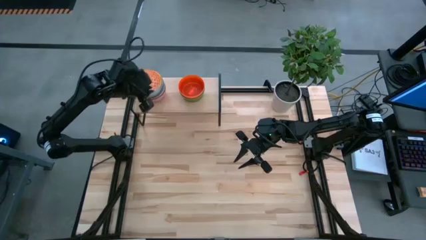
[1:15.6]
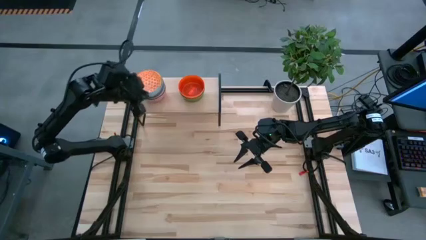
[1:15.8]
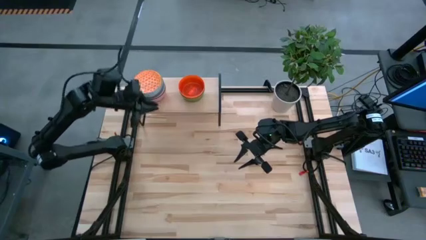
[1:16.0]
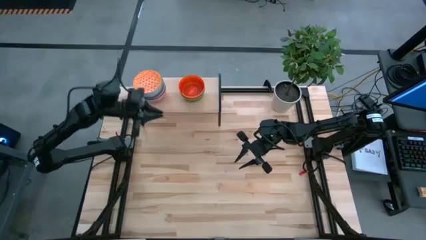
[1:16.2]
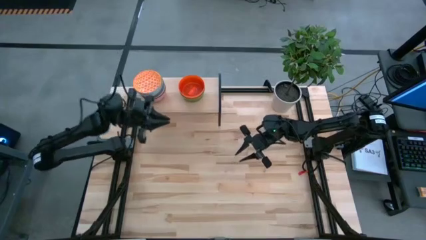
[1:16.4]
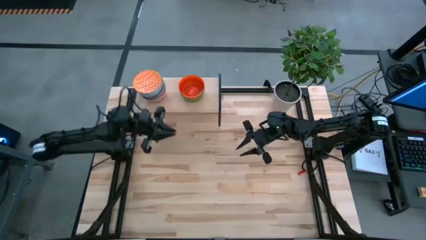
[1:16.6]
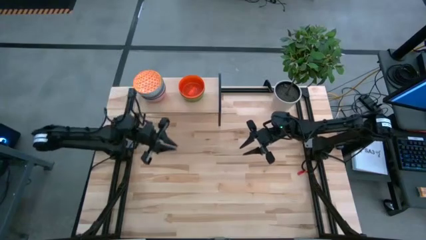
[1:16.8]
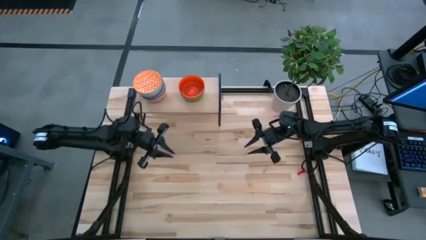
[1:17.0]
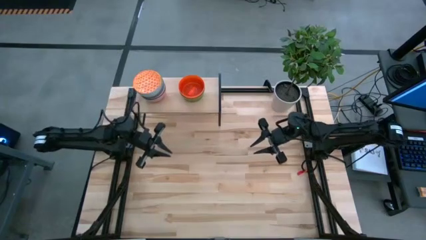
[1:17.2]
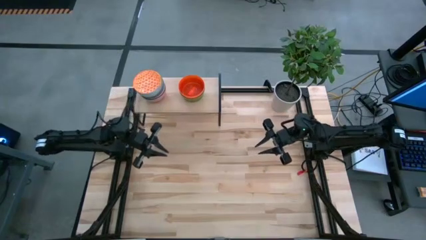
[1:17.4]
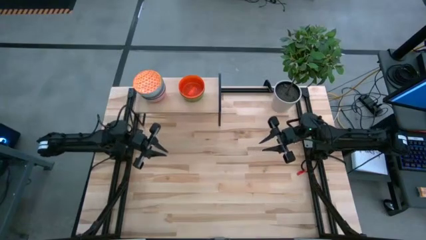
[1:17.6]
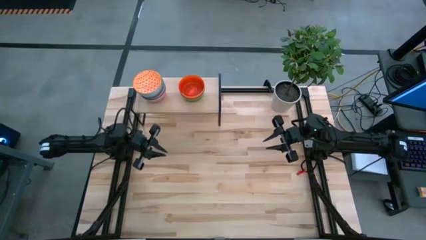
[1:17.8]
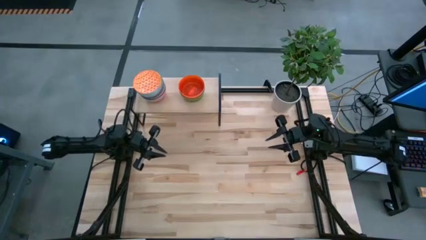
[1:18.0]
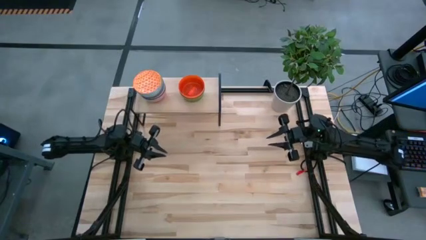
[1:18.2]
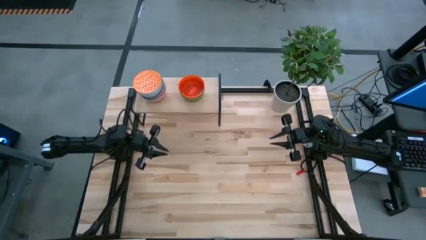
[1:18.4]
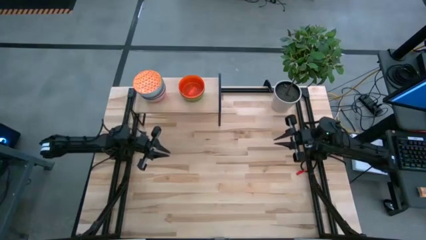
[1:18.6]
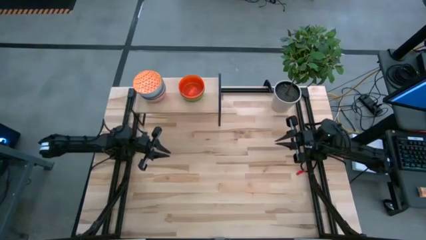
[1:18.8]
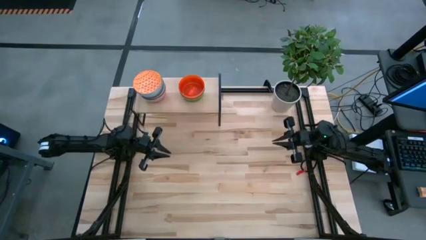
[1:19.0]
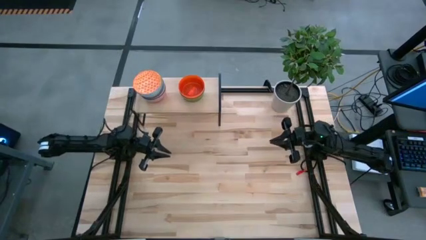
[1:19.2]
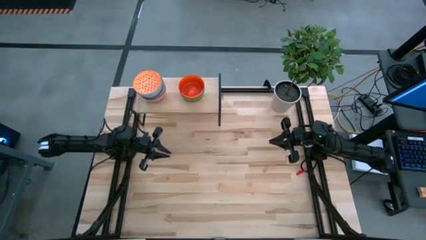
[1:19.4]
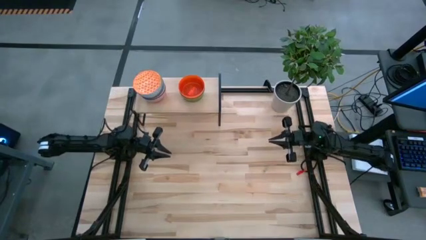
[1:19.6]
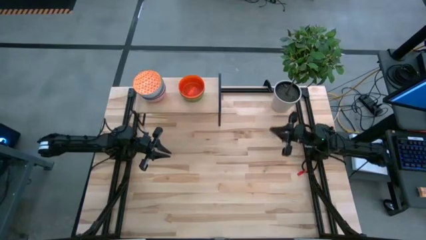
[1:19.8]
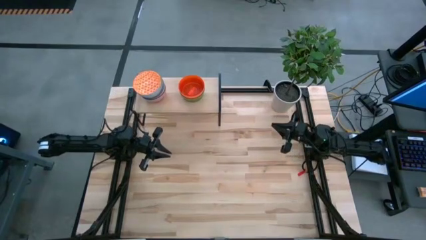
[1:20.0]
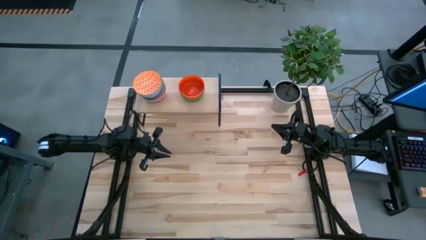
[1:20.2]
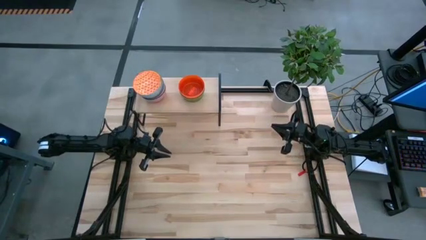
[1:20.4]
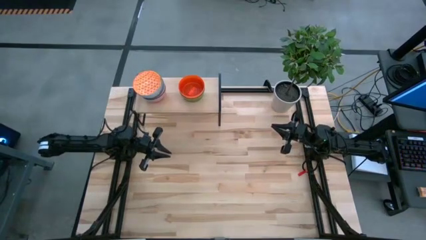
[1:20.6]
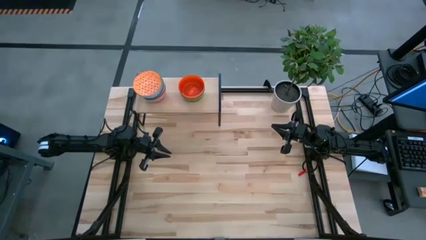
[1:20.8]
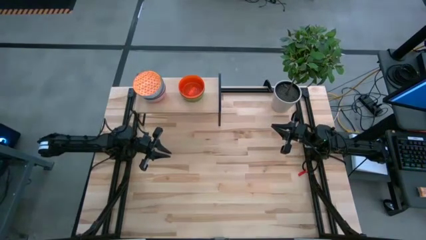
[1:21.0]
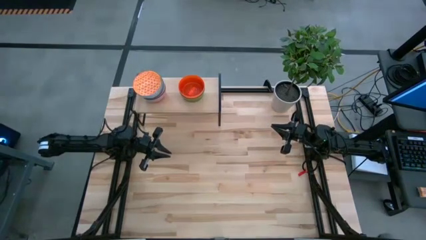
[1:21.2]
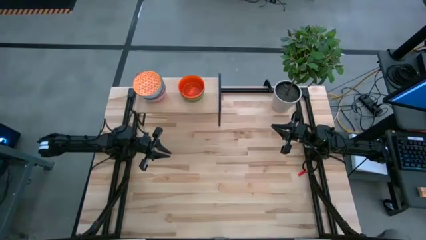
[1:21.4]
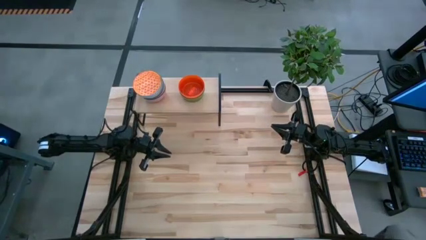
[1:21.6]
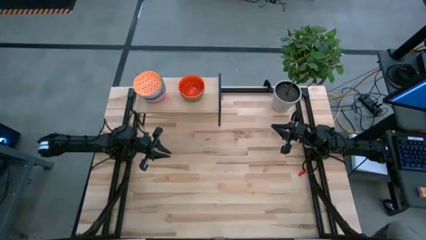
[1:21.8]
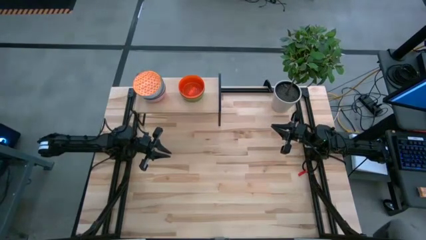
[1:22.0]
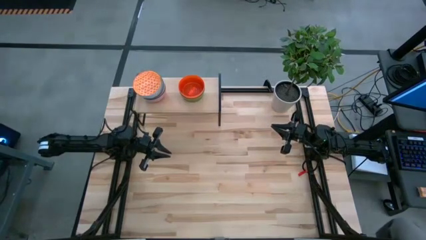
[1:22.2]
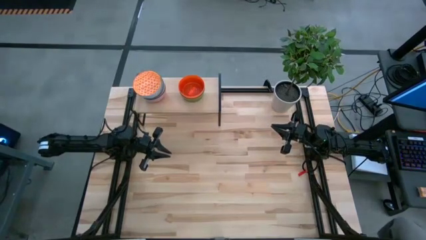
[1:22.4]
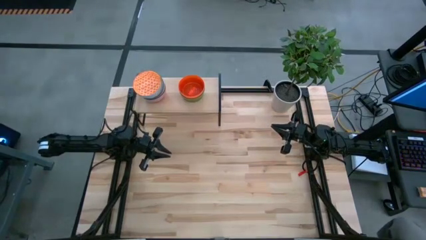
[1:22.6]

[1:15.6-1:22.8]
Task: Place and stack bowls onto a shelf
Return to Home Position

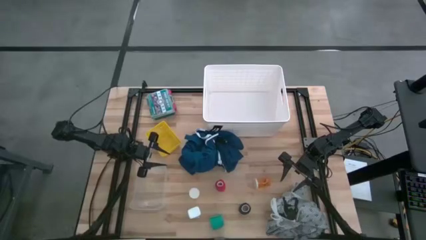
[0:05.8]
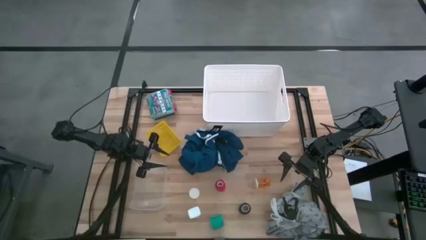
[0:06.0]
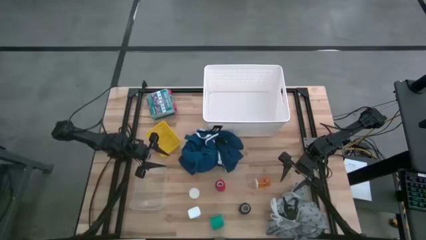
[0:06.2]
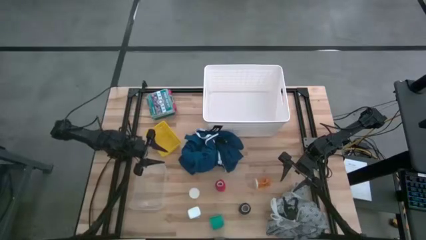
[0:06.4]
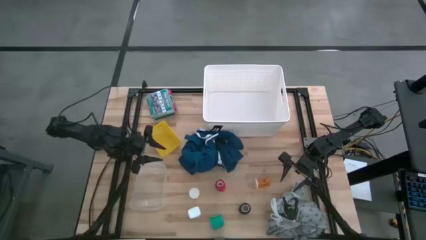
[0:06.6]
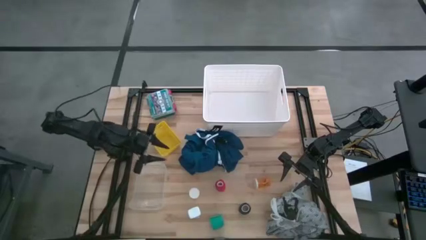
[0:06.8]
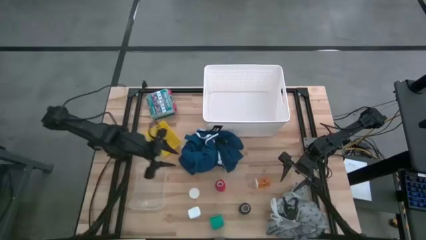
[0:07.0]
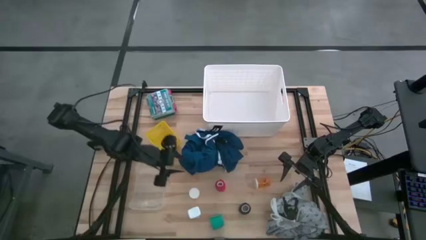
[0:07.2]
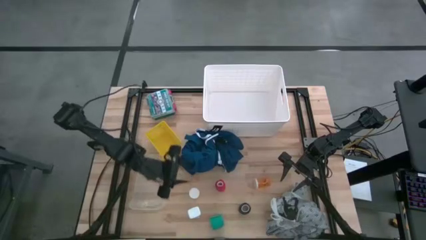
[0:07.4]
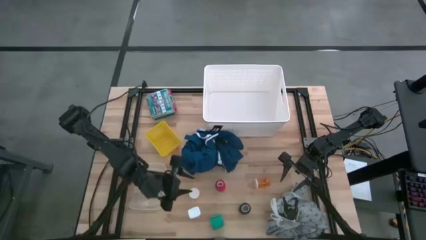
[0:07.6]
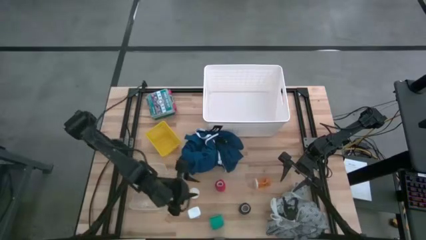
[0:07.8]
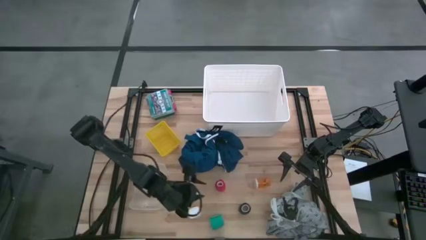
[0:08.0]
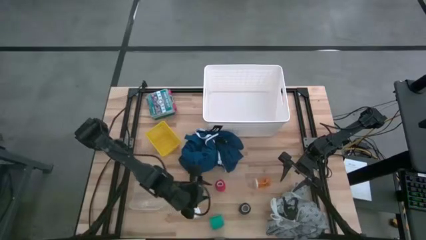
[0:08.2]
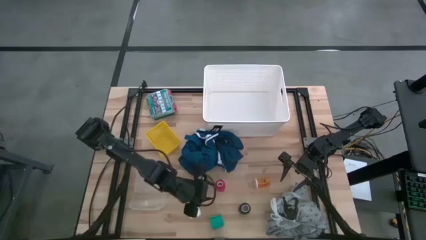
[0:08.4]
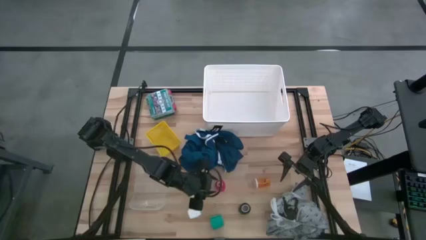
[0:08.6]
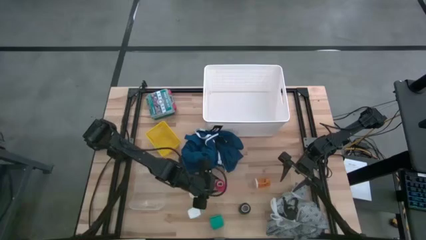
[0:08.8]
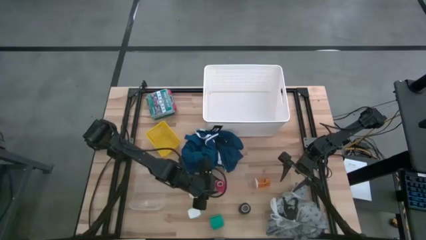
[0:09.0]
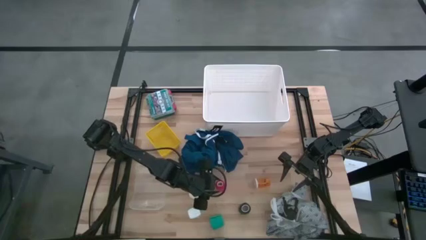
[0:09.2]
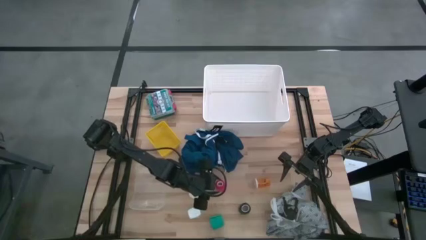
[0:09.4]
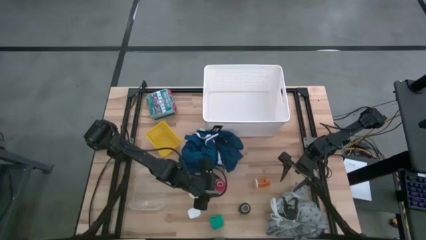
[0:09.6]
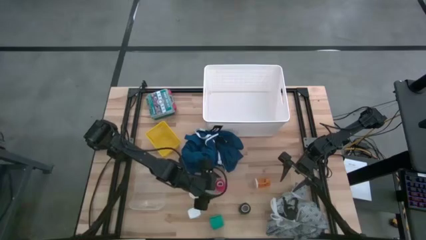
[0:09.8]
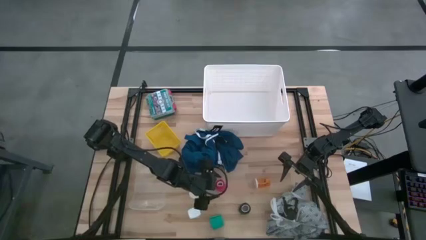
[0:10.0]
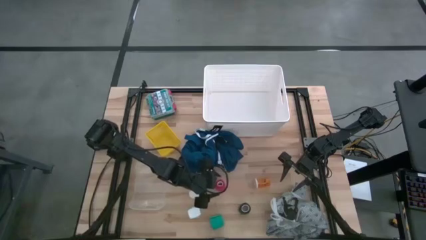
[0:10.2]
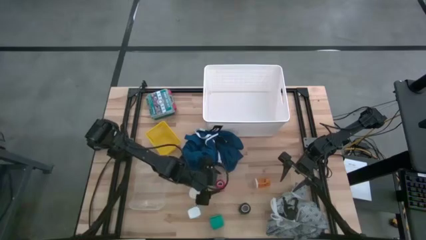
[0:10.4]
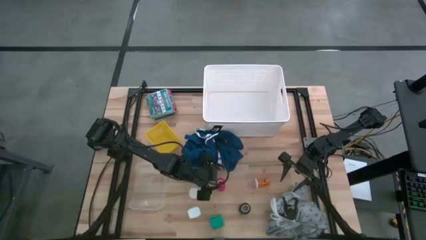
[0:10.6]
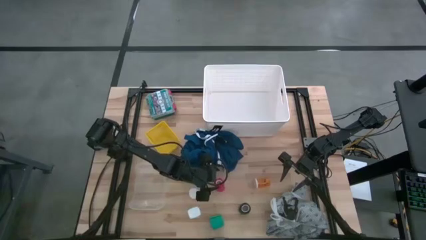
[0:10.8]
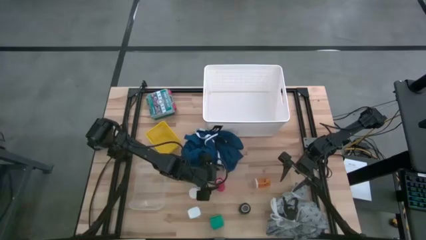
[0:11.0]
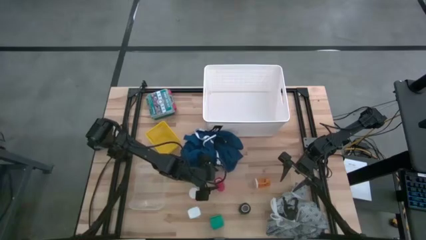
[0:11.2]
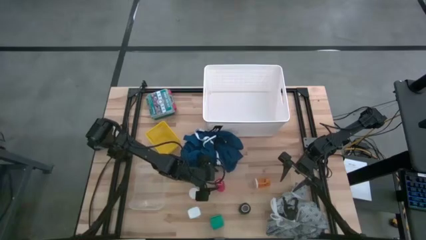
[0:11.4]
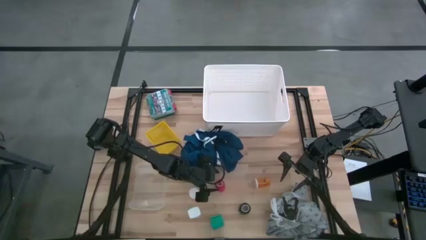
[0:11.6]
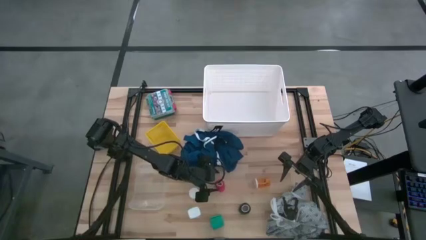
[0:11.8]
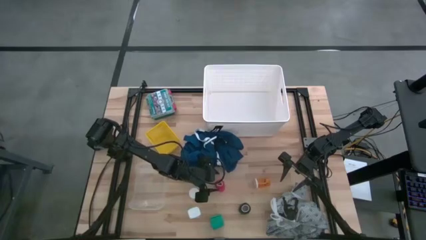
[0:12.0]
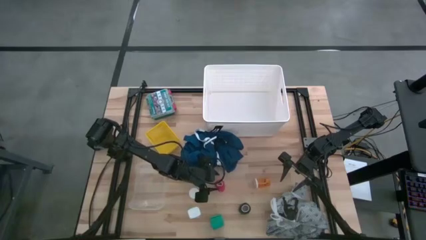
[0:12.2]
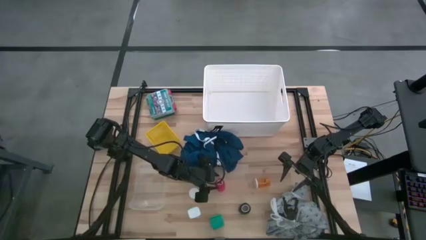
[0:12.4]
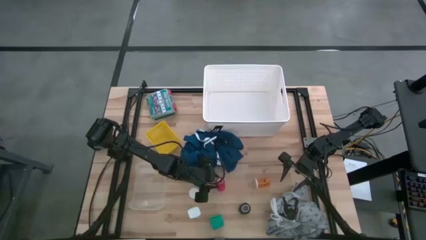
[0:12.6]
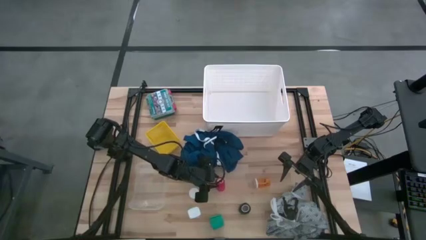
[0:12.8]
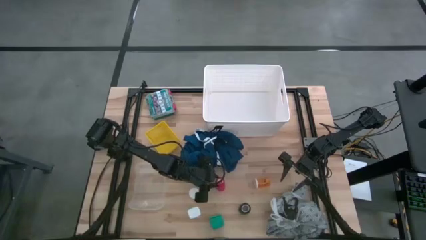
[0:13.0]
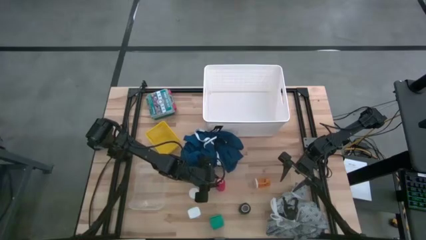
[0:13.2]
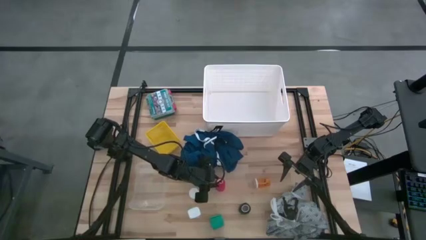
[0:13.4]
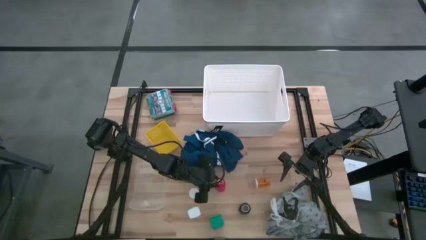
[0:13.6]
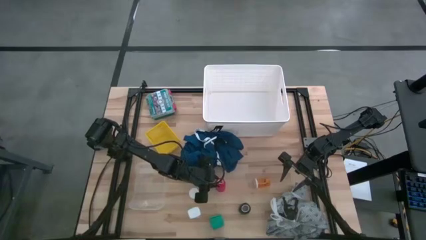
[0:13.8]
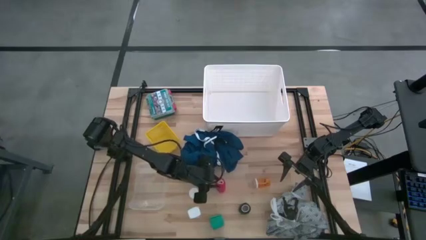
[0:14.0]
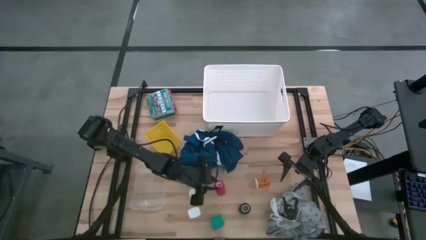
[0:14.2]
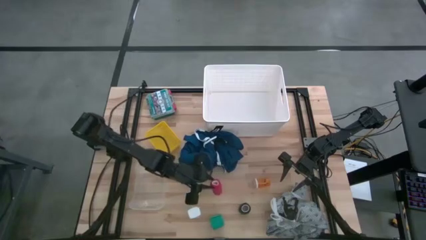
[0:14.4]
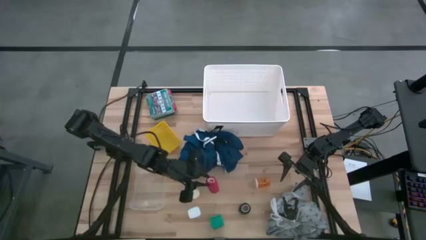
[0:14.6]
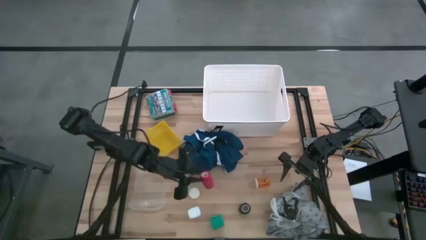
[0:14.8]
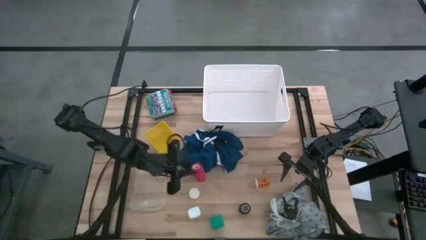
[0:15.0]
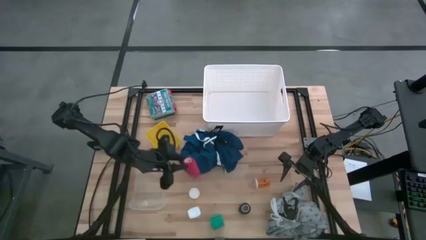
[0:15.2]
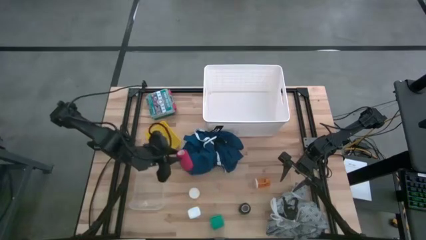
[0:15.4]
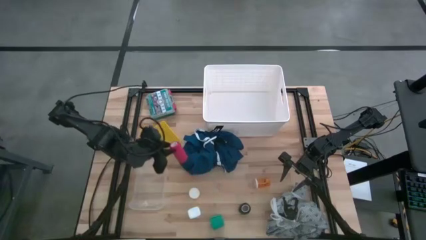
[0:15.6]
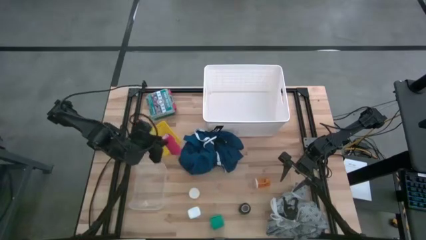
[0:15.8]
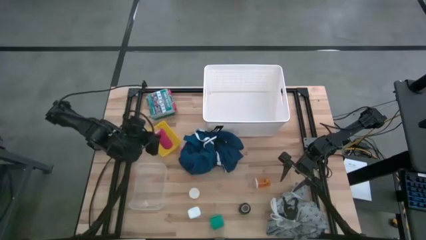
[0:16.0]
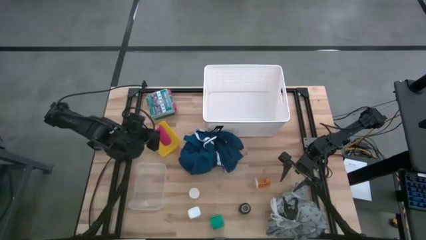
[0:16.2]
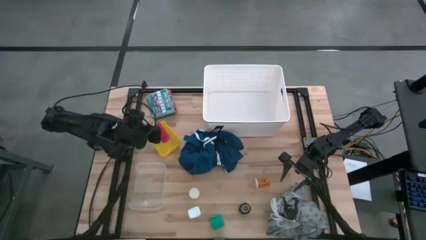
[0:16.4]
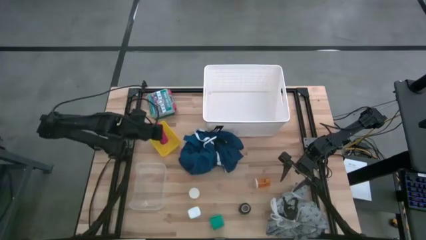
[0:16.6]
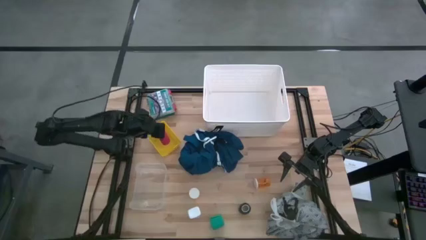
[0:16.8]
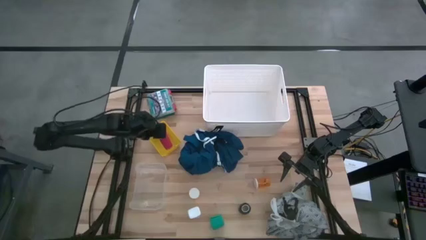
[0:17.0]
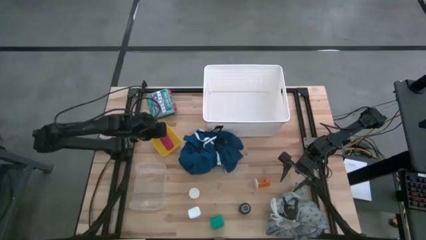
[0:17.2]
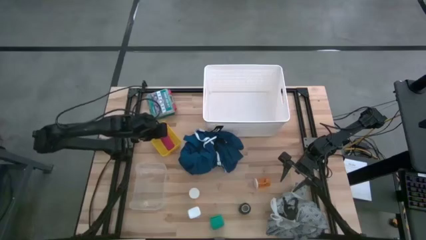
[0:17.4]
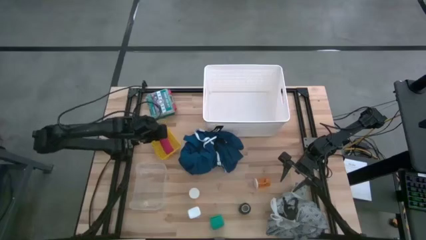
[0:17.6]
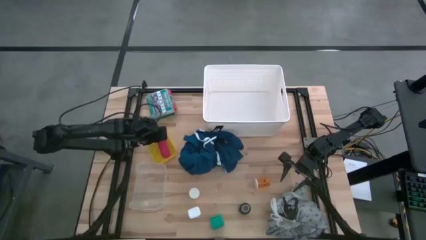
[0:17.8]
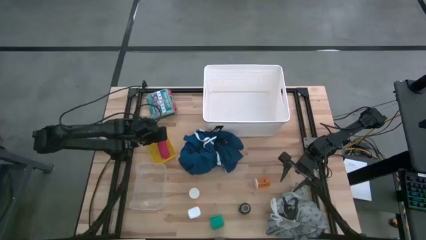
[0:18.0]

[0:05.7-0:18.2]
Task: Pick & place medical supplies in basket/bin
Put the red bandage into the yellow bin
